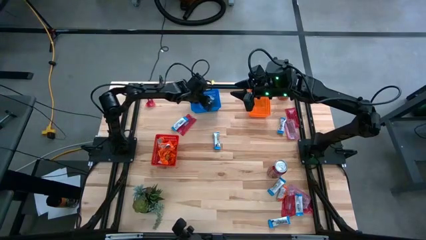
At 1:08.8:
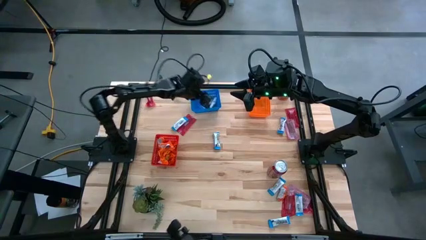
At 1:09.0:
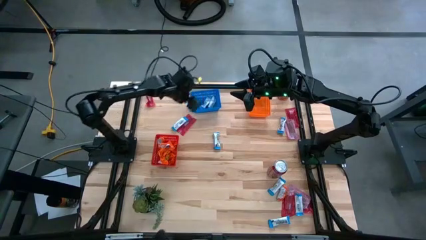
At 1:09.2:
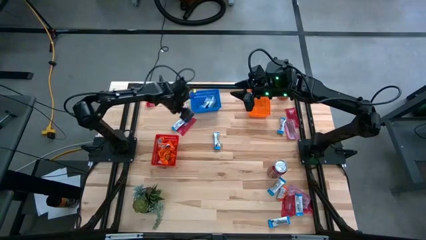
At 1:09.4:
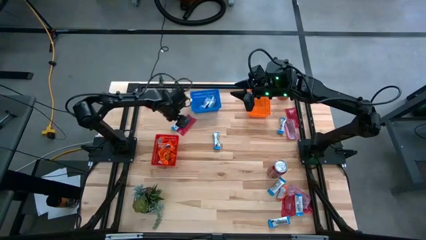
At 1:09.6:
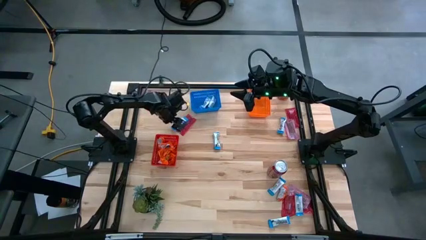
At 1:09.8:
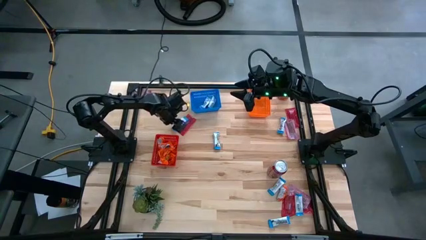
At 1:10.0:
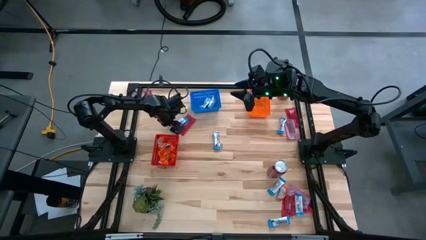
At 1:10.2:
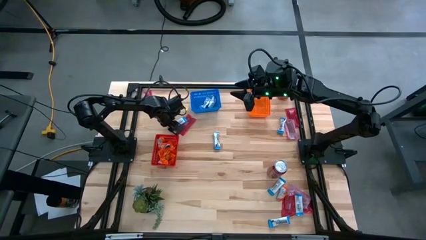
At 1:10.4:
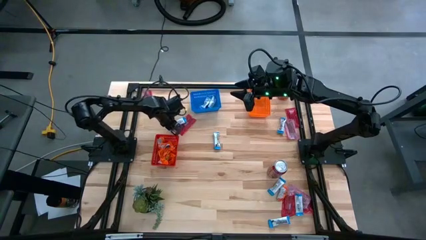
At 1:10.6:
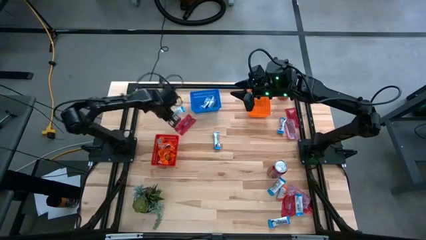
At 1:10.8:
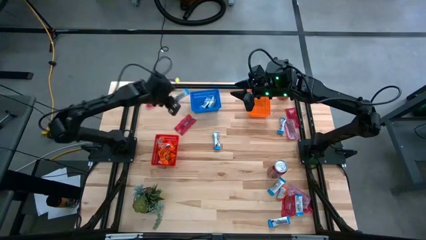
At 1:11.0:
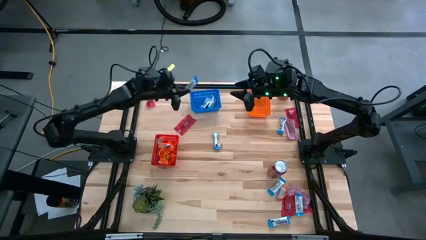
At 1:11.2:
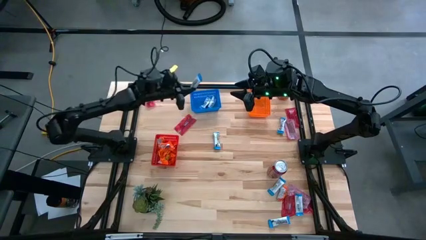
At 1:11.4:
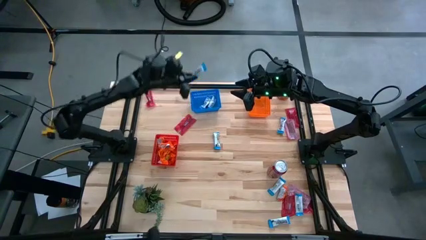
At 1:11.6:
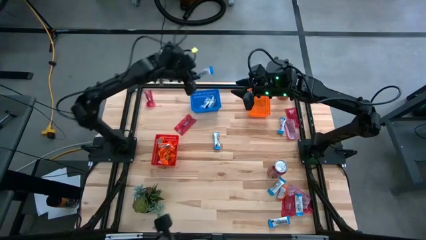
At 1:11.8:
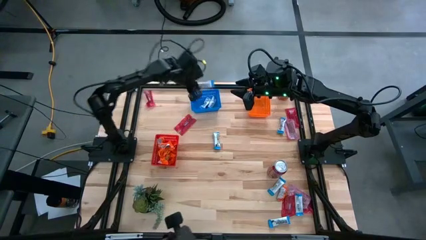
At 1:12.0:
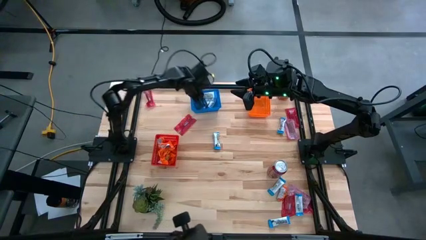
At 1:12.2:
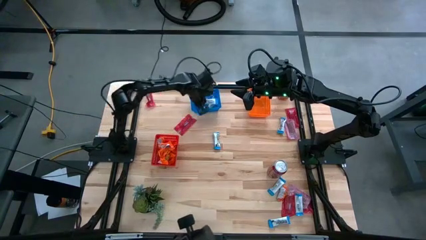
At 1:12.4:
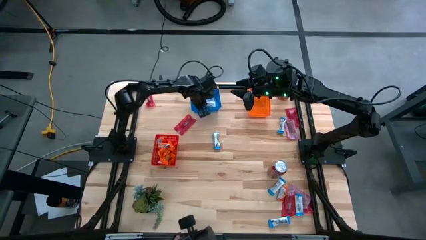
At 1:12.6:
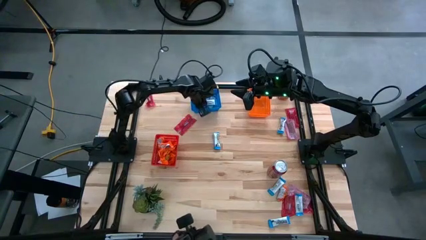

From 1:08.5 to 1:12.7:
Task: Sort candy
Put the white candy pack into the blue basket

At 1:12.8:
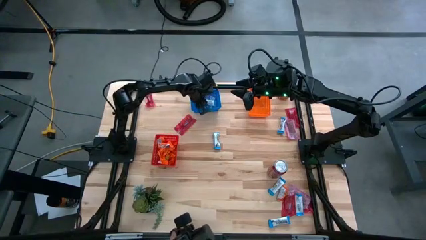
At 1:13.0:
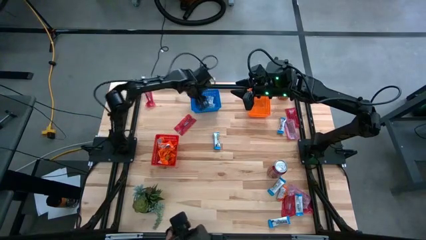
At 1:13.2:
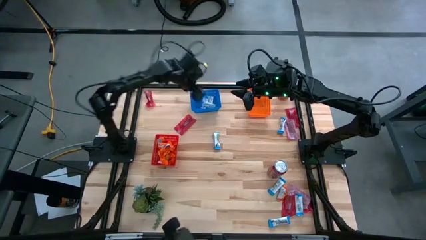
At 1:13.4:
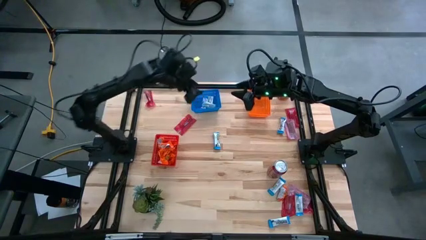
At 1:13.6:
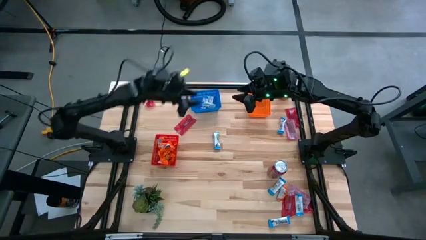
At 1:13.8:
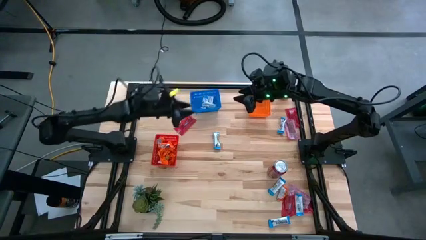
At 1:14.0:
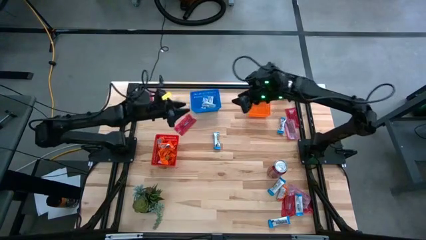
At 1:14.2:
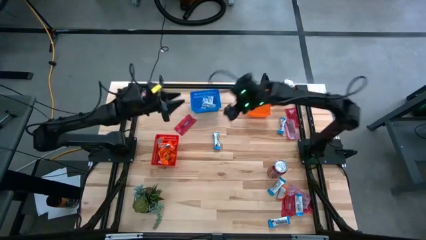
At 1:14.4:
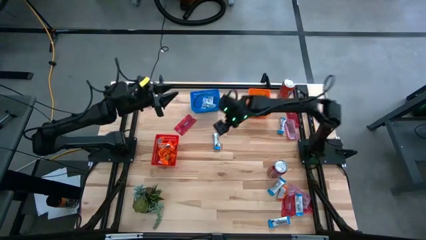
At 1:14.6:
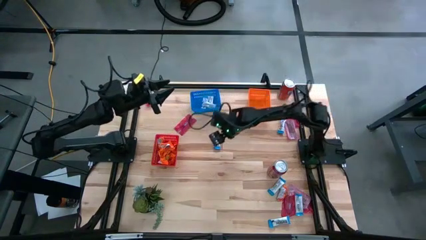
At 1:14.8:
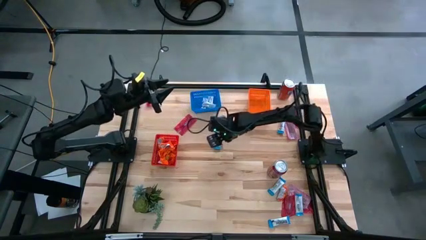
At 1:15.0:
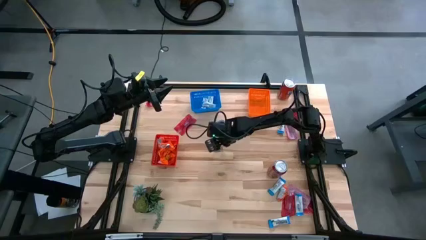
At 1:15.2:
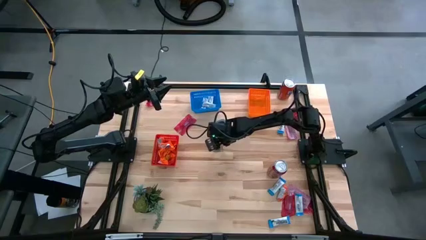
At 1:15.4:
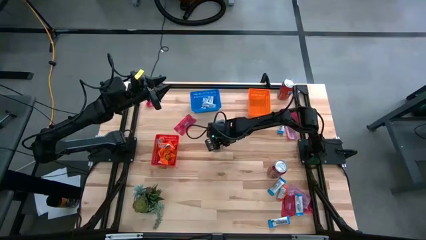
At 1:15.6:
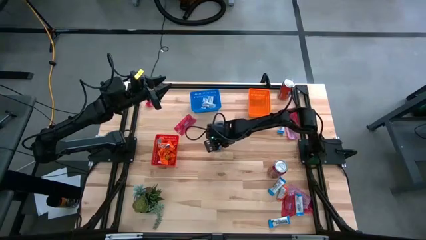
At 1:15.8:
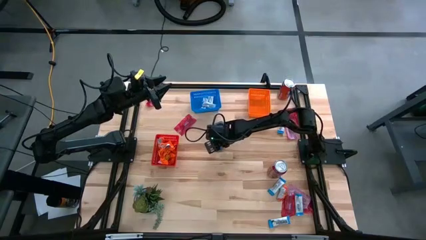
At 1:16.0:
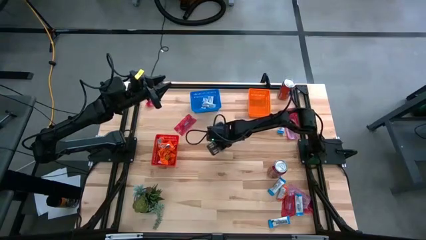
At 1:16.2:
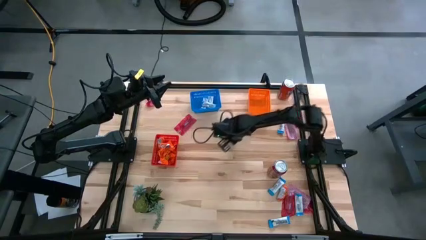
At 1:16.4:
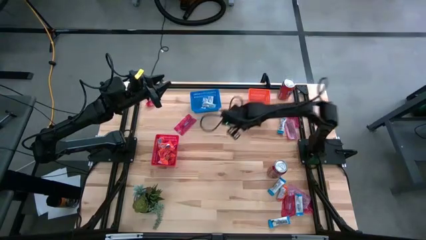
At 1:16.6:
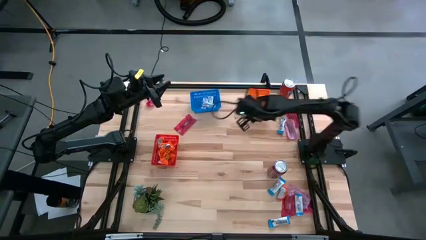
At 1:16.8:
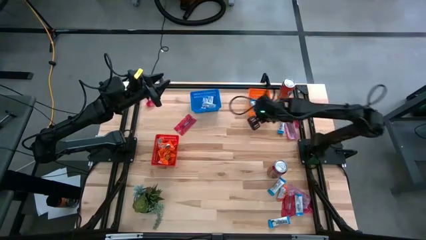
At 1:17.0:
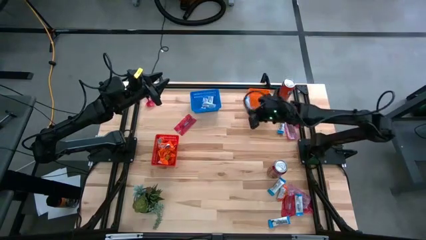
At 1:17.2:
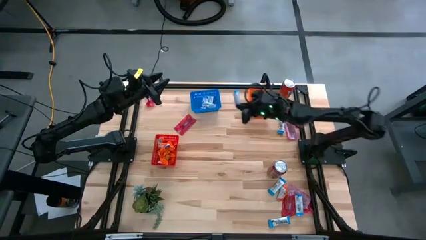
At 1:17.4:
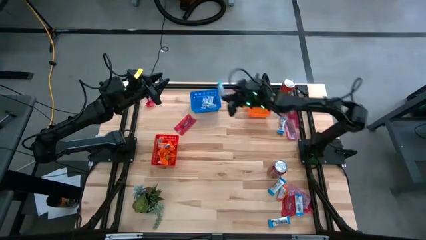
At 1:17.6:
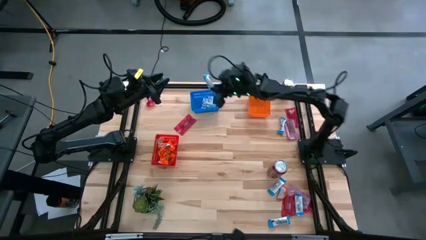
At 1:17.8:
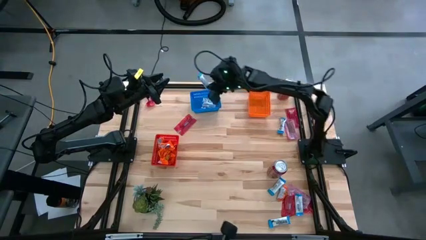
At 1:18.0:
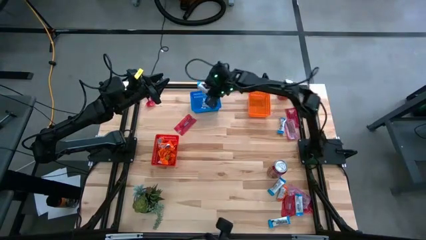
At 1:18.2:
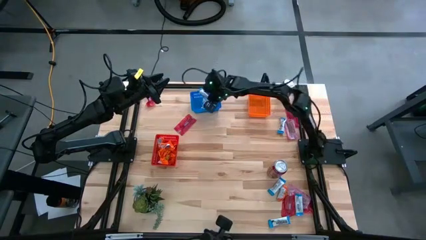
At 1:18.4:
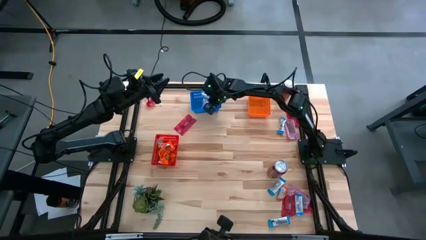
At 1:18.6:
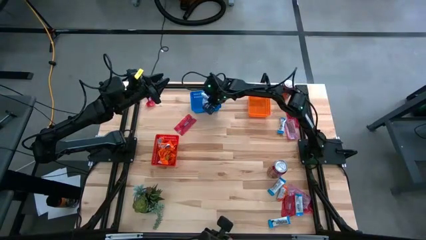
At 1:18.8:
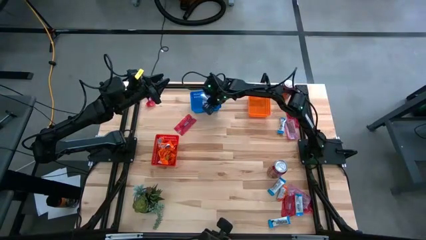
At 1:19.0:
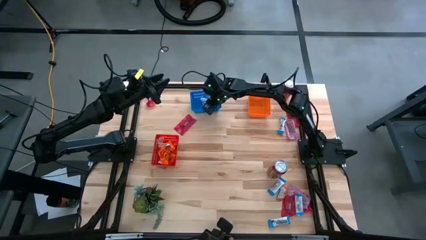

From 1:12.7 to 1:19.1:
Put the white candy pack into the blue basket

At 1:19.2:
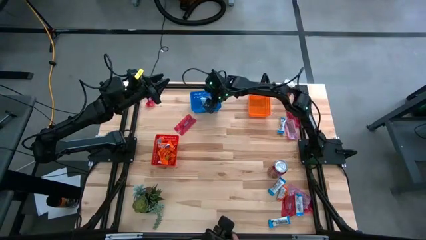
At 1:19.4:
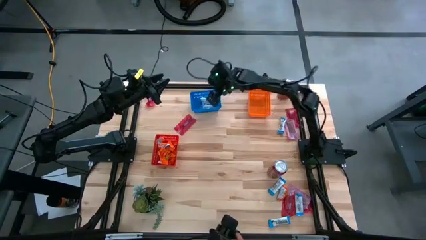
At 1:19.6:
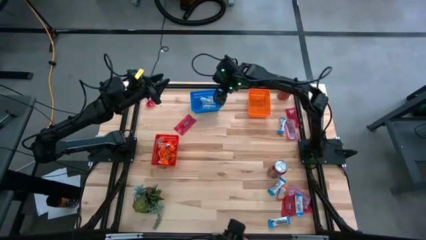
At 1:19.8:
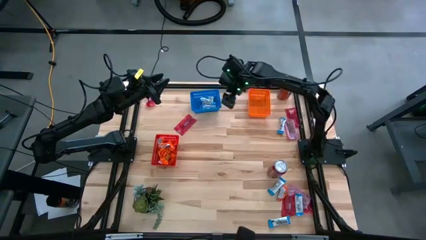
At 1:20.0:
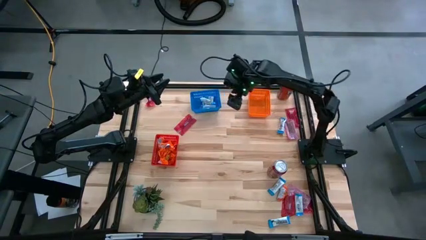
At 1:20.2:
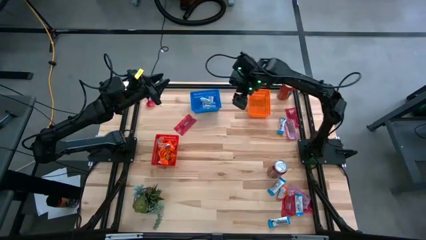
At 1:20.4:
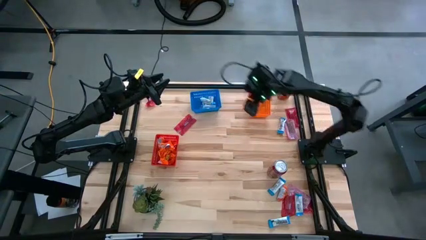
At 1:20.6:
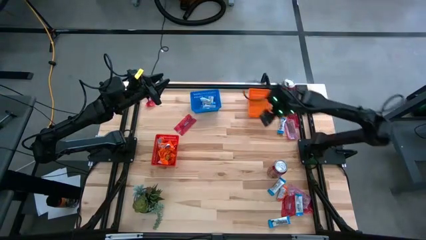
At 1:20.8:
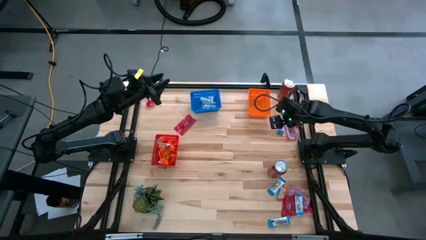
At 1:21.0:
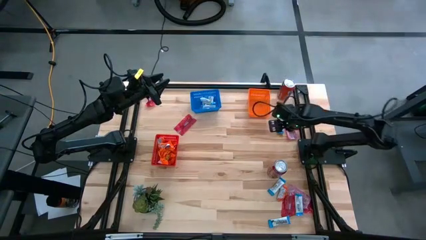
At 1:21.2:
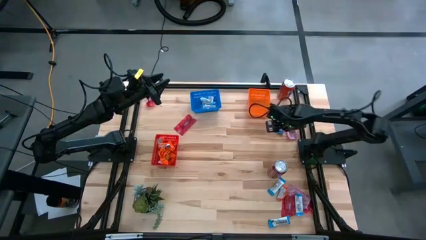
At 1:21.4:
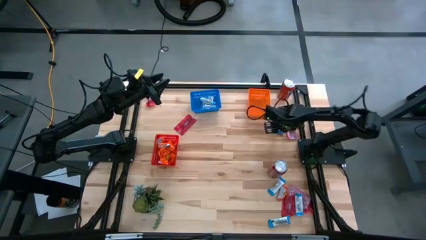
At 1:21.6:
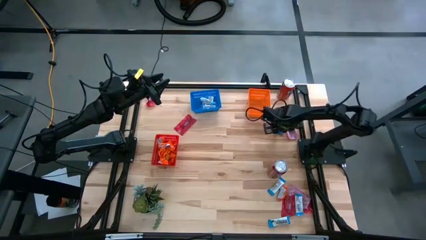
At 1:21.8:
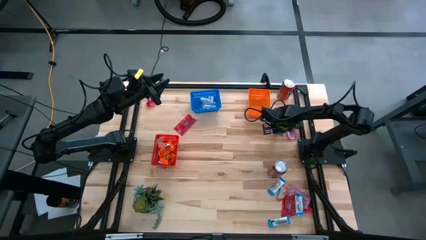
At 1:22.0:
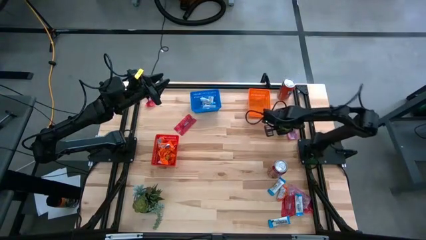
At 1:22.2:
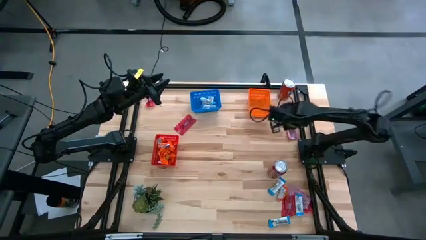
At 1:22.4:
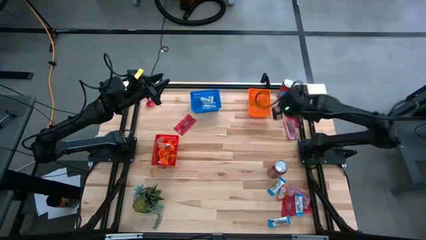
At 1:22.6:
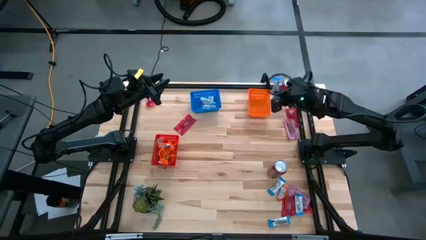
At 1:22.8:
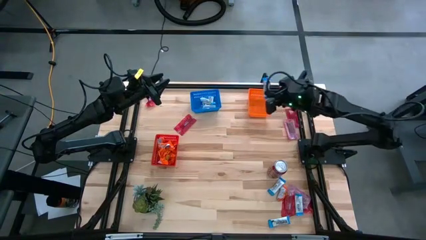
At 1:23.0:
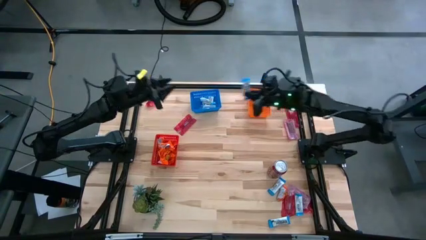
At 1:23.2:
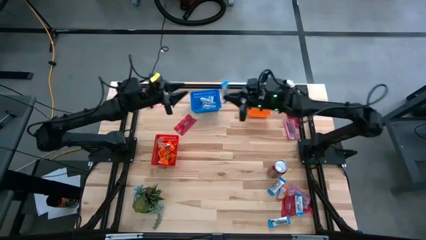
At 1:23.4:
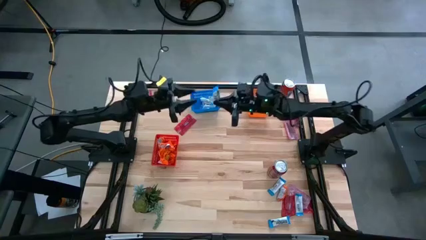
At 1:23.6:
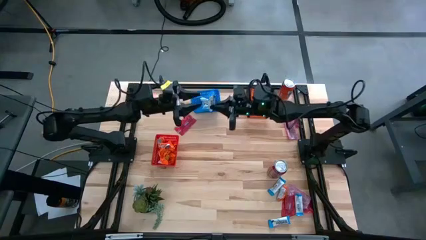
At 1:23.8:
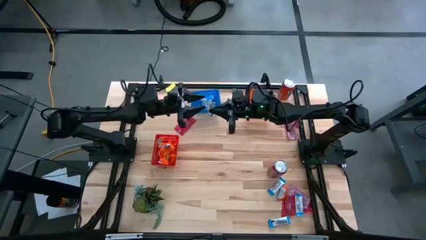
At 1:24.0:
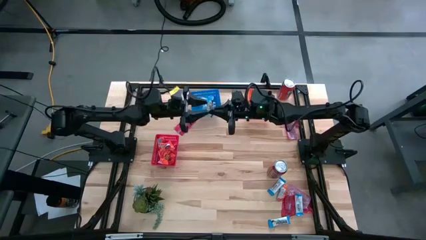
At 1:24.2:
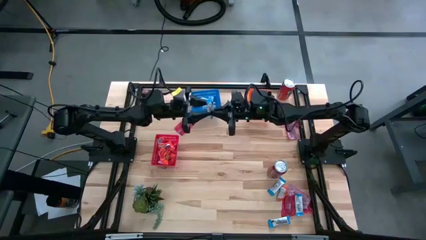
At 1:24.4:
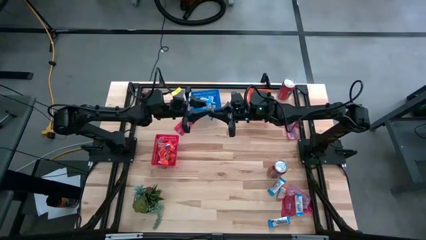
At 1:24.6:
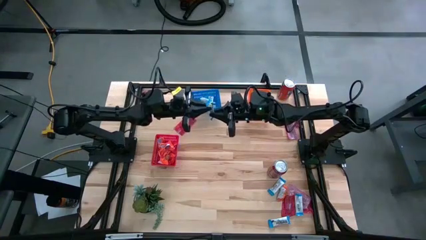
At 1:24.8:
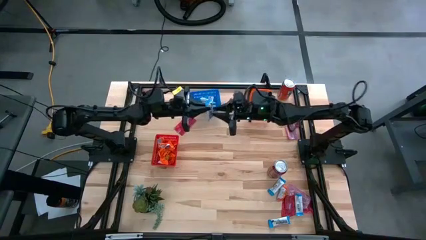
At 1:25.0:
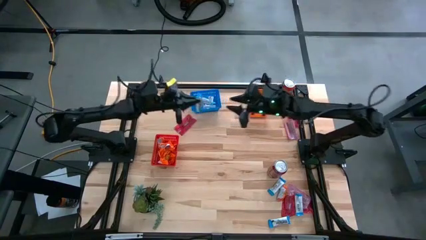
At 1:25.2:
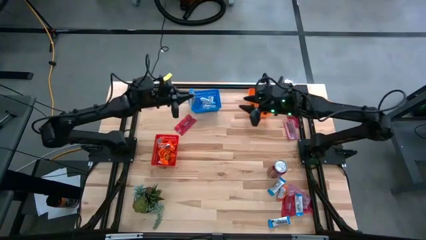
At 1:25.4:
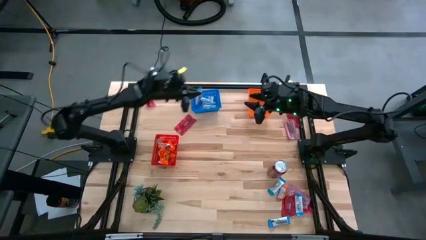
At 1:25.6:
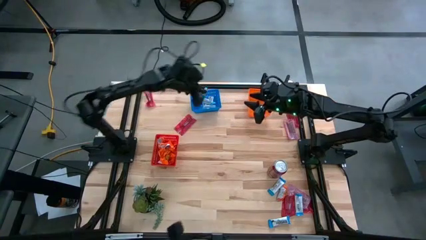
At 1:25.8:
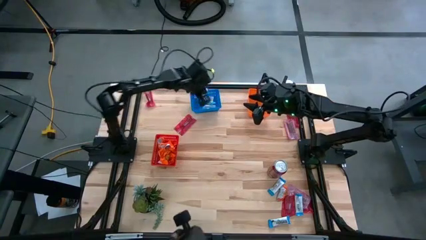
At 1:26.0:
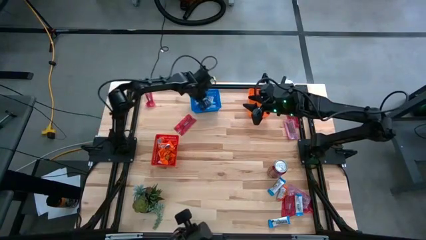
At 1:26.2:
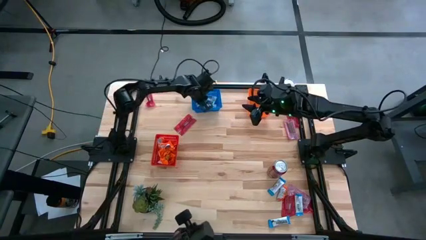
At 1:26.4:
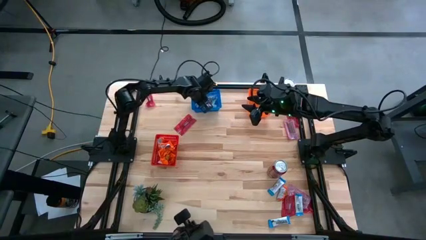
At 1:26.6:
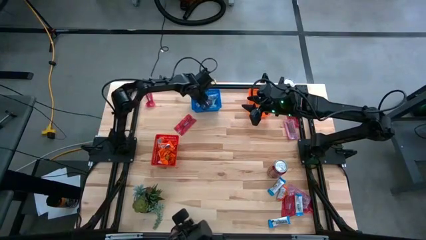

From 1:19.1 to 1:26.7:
Put the white candy pack into the blue basket
